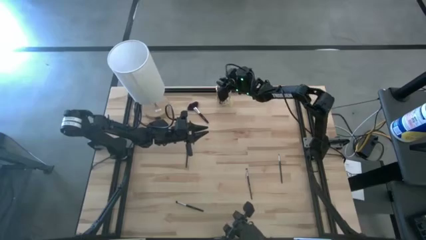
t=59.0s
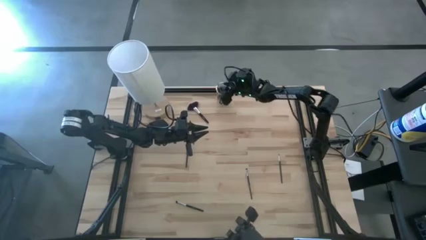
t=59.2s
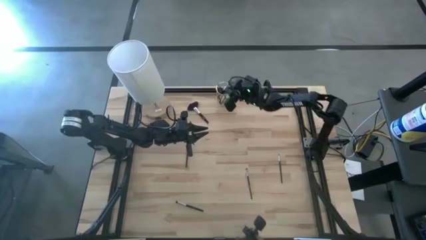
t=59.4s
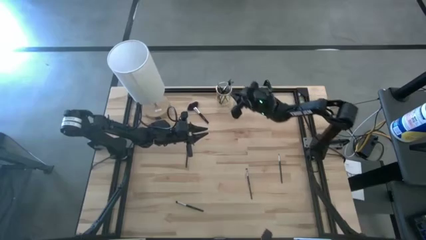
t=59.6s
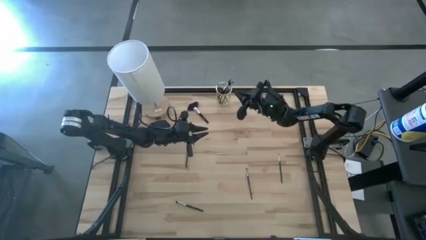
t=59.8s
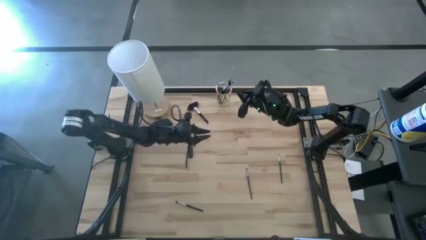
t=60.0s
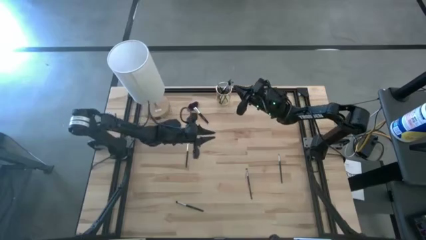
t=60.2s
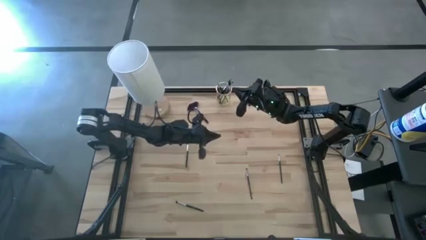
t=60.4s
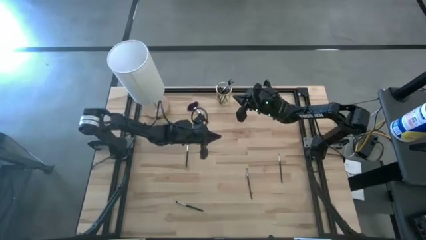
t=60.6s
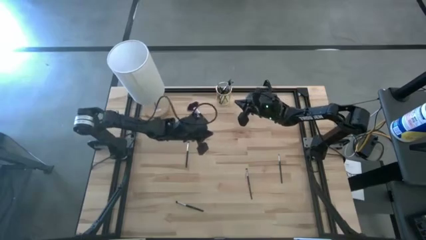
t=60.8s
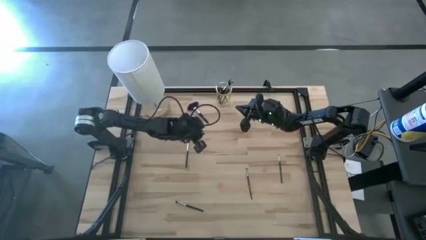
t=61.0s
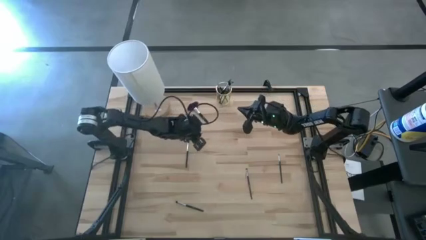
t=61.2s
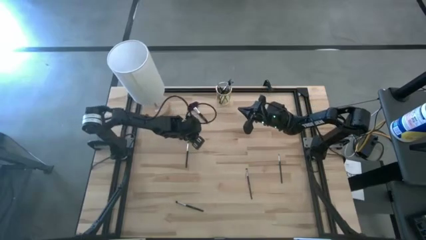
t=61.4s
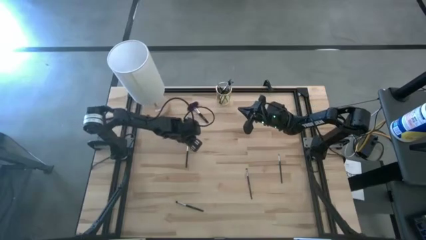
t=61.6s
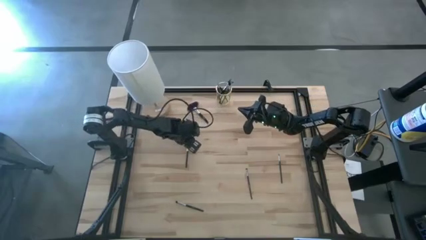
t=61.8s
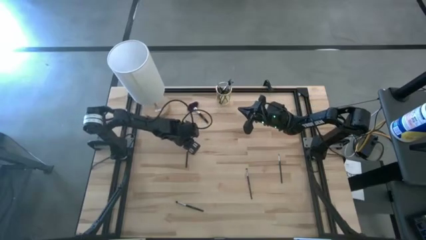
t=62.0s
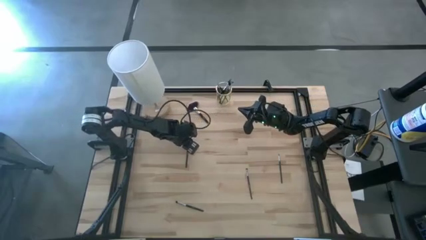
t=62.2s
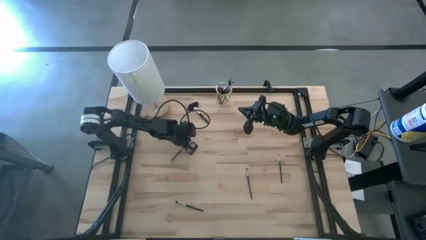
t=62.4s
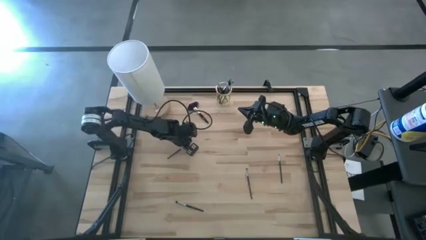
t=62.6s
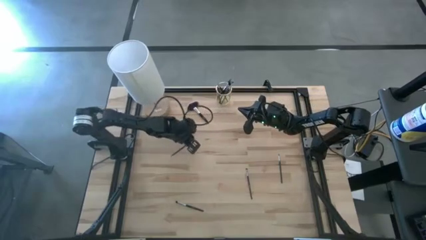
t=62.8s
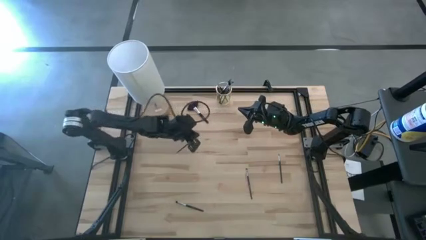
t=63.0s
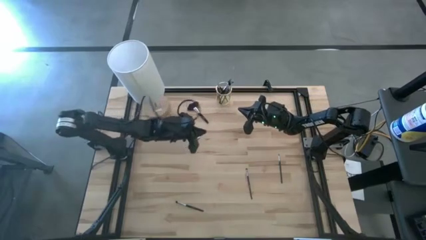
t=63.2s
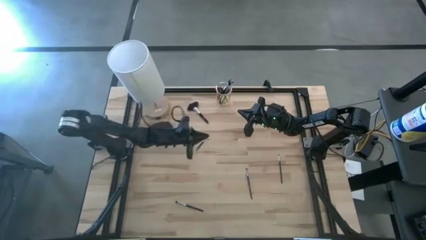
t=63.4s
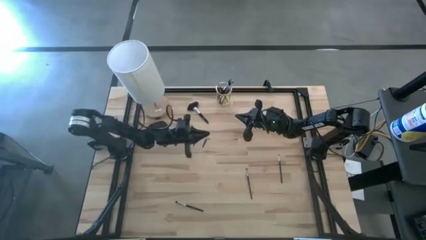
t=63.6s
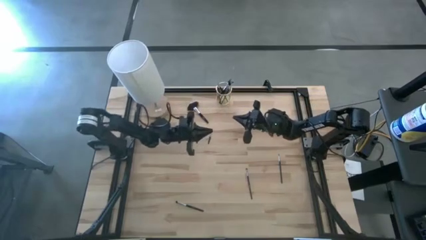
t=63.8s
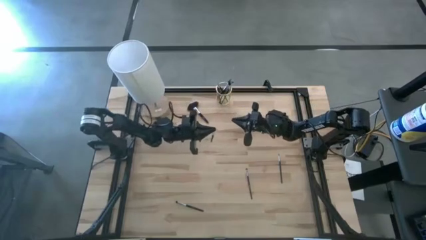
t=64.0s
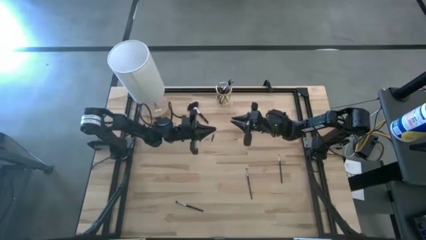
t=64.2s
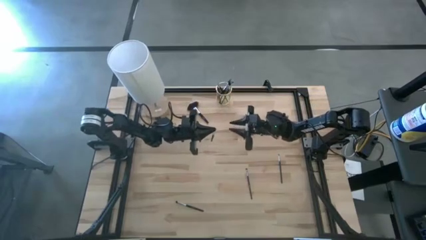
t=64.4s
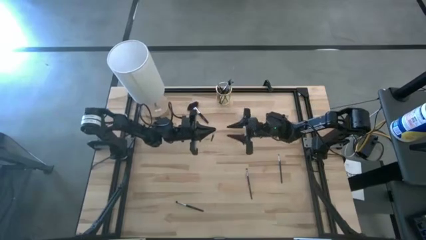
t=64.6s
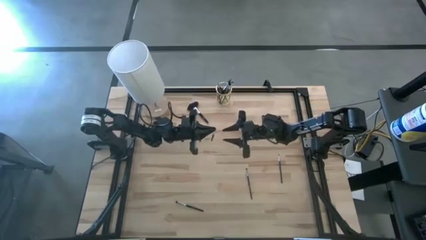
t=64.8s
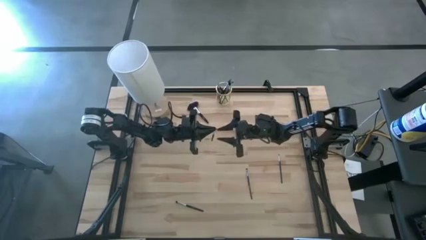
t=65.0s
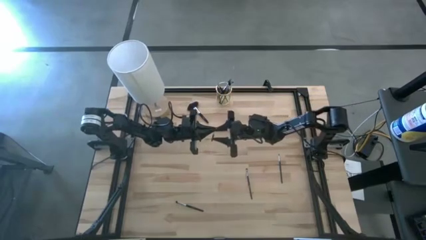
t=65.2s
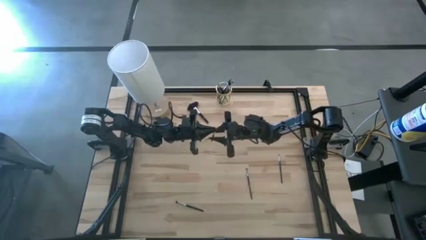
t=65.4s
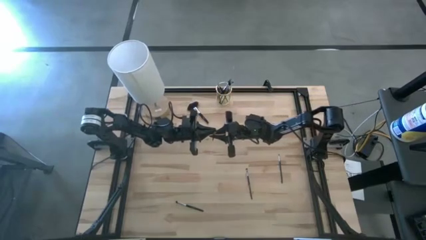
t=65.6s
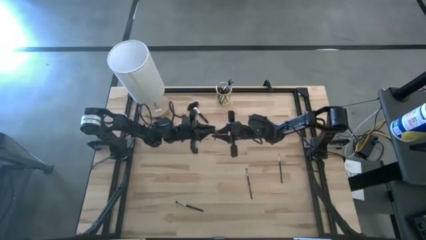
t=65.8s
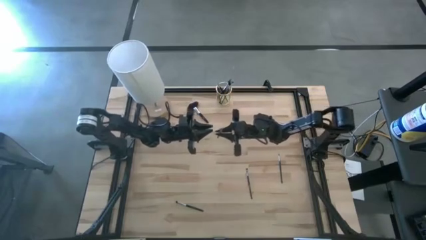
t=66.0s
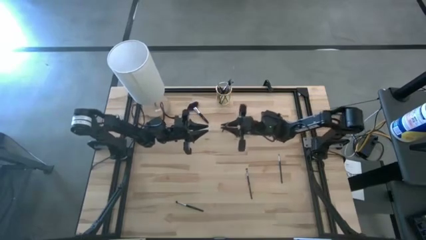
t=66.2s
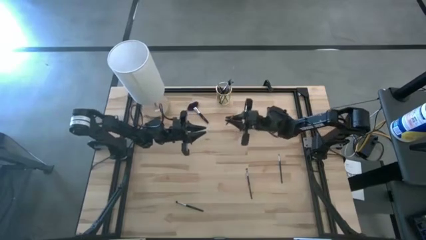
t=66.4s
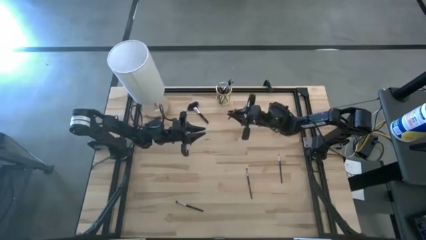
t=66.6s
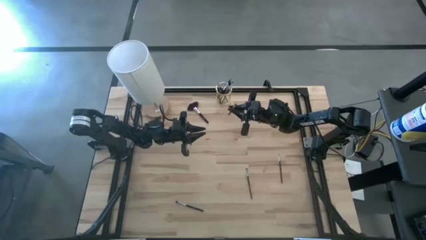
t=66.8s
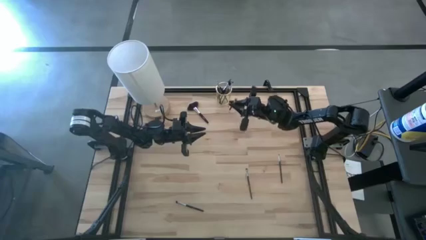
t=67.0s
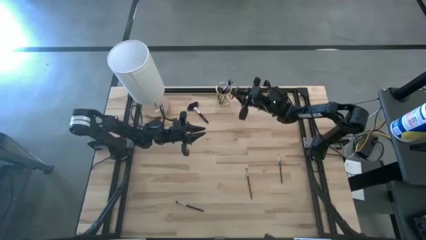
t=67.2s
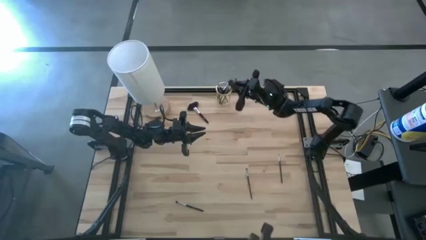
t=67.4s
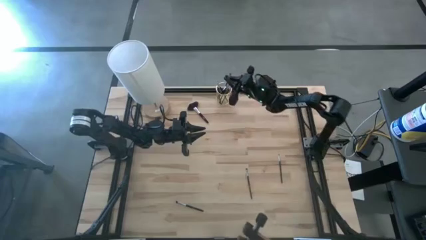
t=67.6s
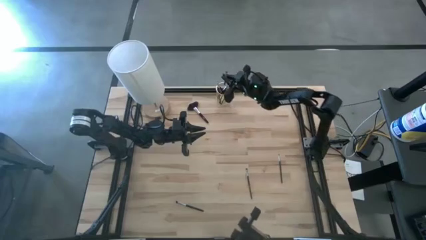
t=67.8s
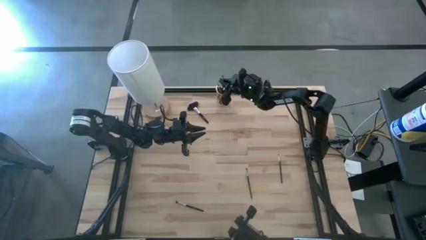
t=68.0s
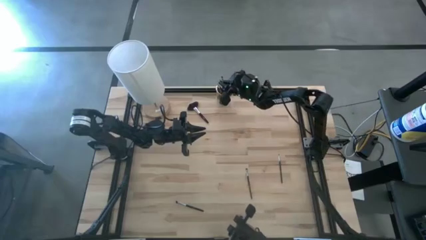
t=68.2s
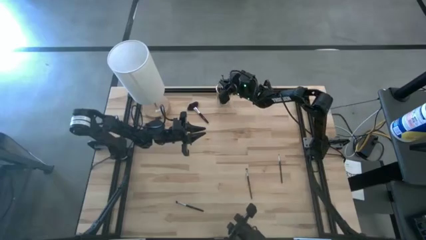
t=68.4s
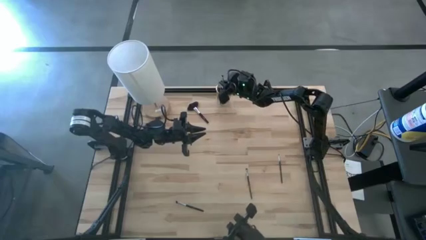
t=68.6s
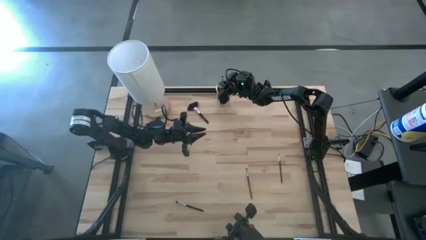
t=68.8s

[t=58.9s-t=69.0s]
Task: Put items in baskets/containers
Put the eyeshadow into the gold container

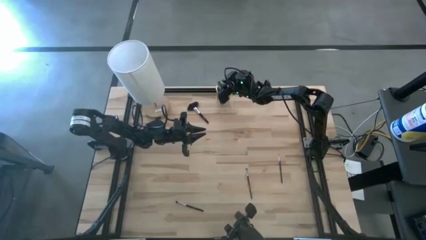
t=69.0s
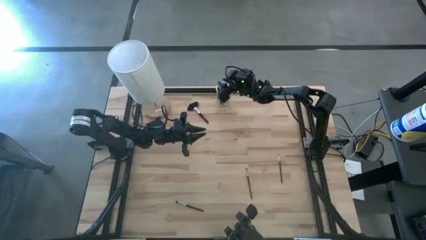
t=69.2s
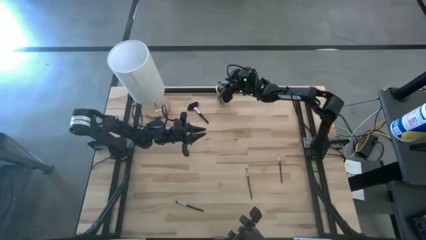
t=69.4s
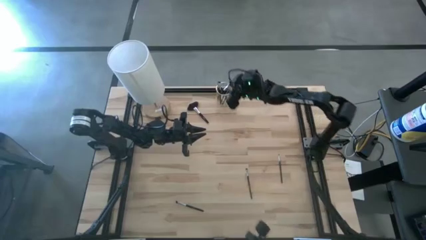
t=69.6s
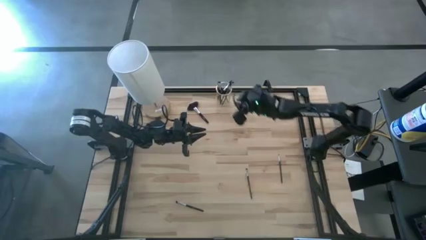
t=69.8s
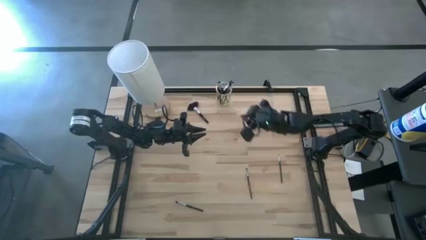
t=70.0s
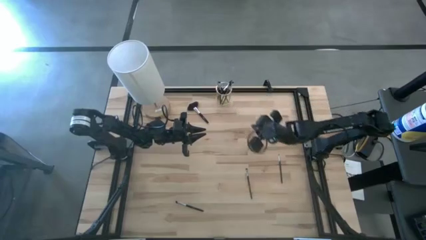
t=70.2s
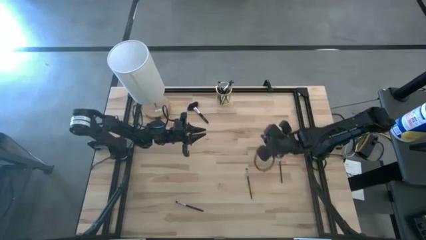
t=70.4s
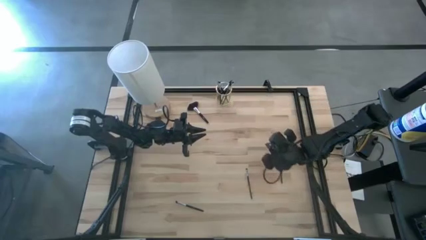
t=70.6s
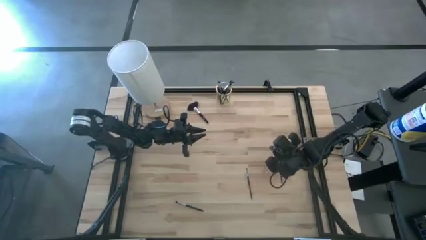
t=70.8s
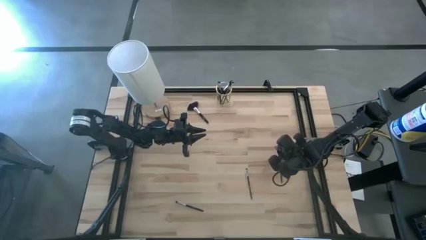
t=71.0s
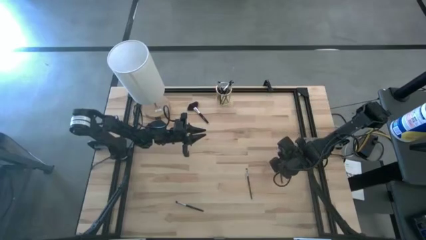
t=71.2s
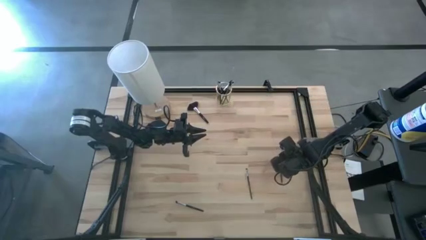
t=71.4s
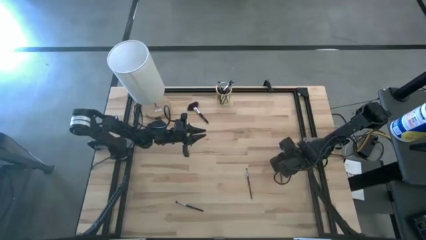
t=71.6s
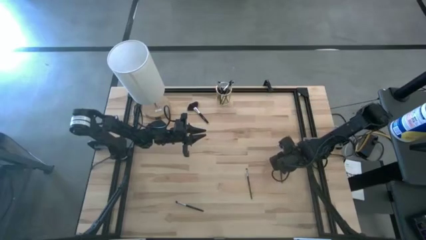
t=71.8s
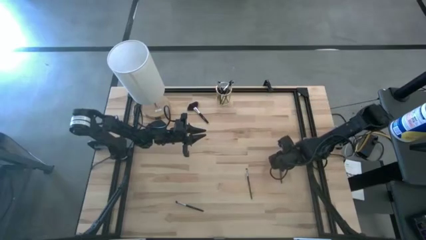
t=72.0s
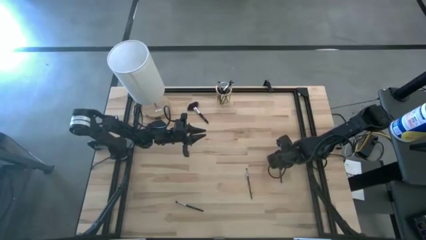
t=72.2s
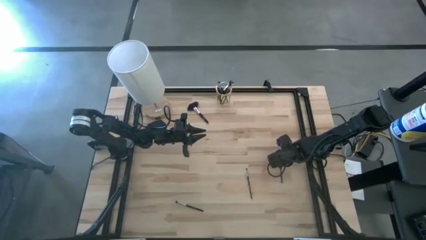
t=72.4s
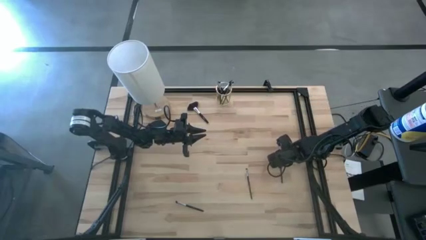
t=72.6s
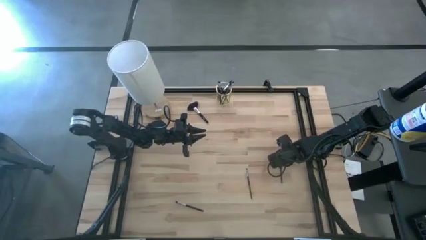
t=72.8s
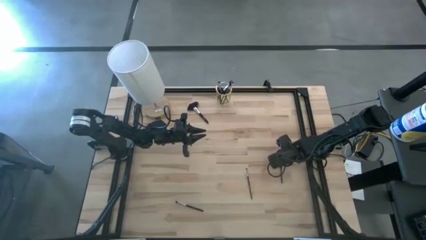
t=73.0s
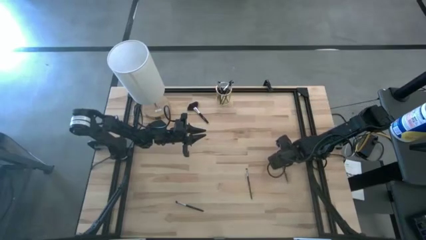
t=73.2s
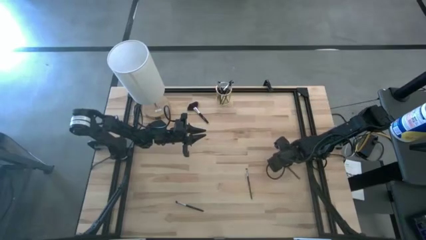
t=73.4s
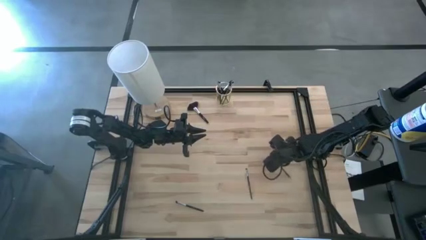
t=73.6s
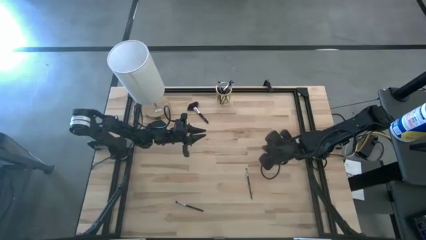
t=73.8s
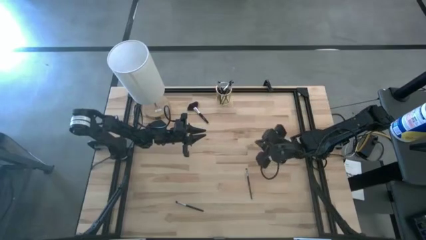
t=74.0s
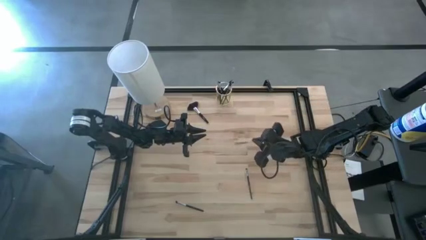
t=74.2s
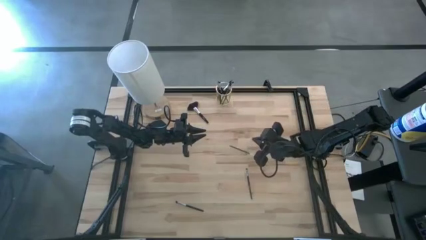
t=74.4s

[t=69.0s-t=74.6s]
Put the eyeshadow into the gold container

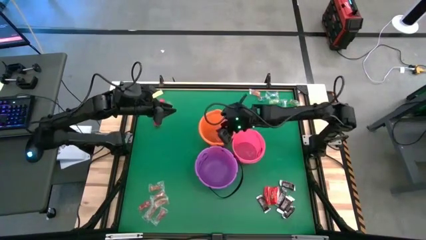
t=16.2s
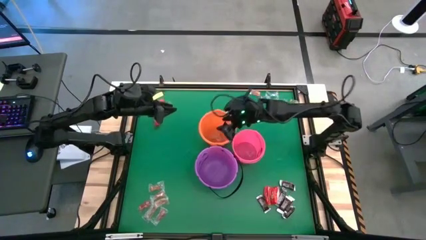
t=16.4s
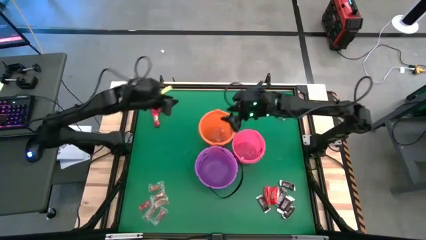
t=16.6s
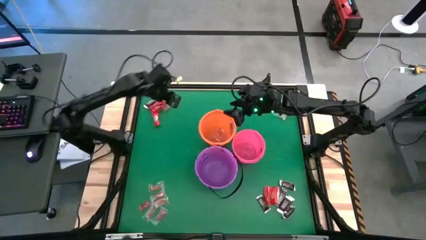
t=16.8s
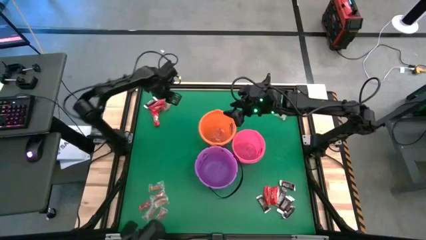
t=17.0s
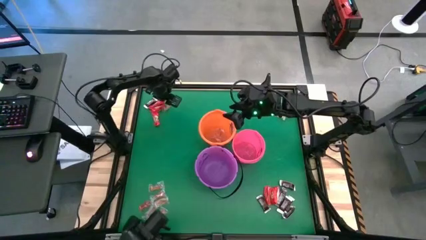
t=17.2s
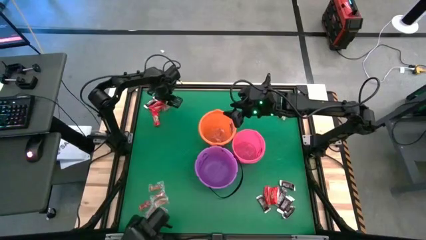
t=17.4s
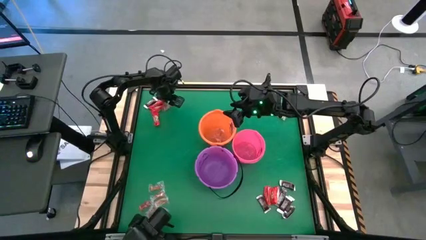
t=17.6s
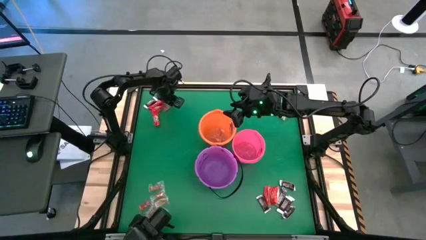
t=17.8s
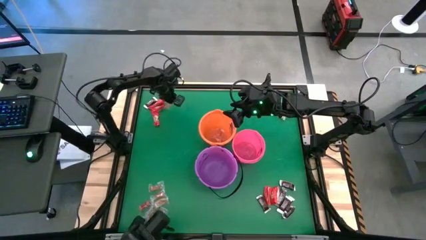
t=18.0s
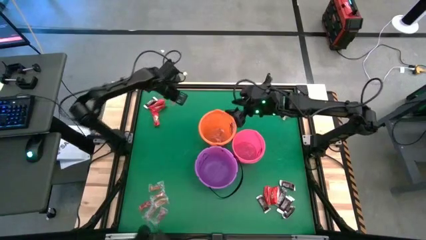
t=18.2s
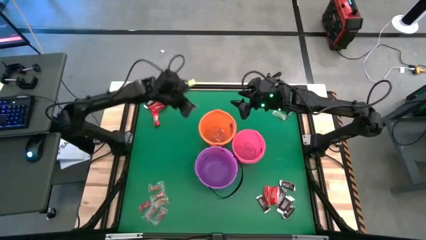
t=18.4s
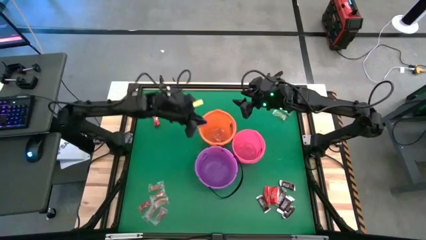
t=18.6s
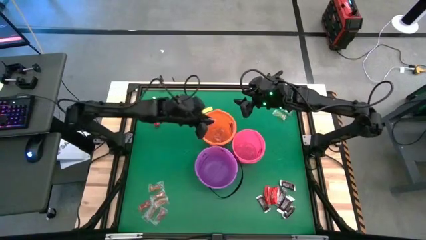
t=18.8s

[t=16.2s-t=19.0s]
Task: Sort candy by brand, put in halloween buckets
Put the orange gummy into the orange bucket
